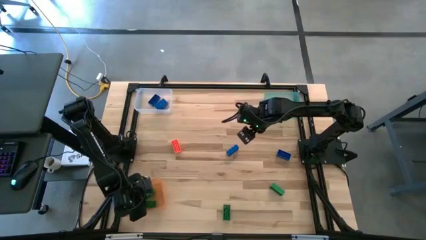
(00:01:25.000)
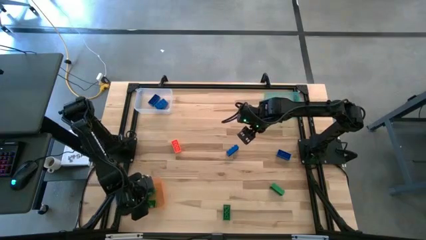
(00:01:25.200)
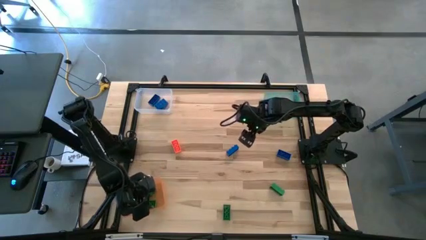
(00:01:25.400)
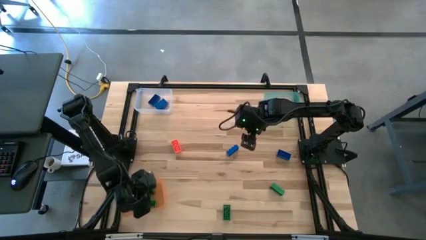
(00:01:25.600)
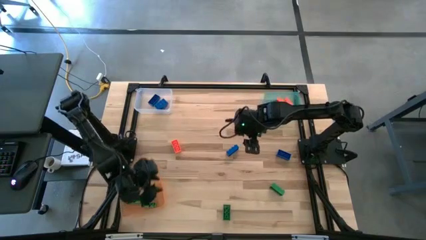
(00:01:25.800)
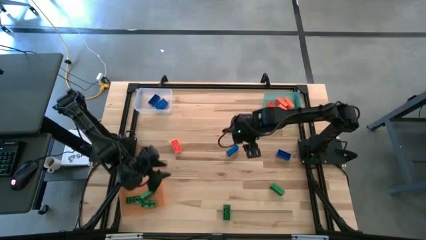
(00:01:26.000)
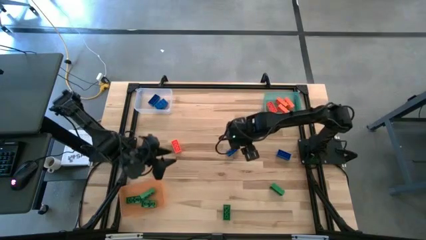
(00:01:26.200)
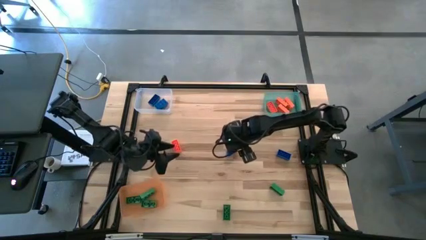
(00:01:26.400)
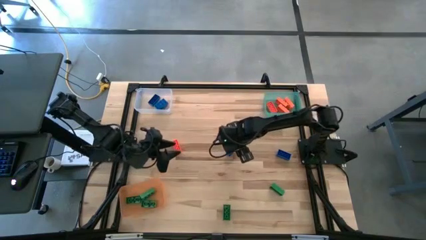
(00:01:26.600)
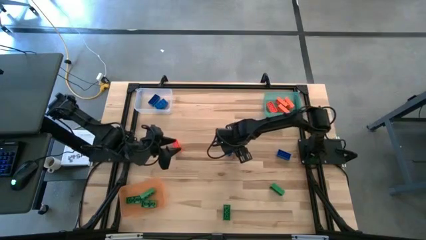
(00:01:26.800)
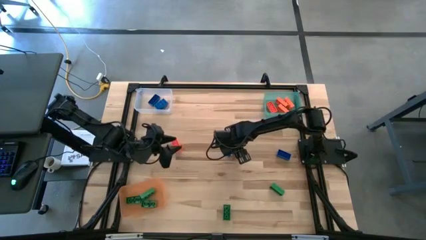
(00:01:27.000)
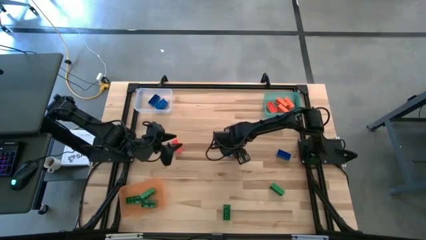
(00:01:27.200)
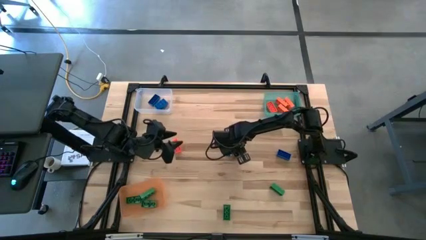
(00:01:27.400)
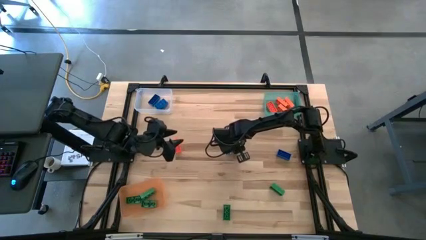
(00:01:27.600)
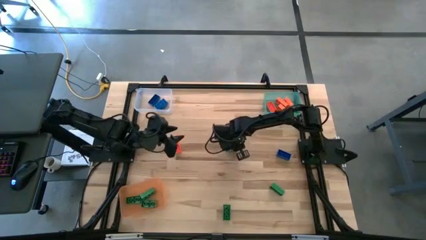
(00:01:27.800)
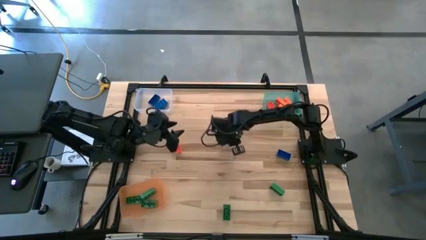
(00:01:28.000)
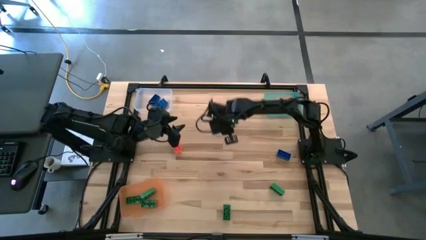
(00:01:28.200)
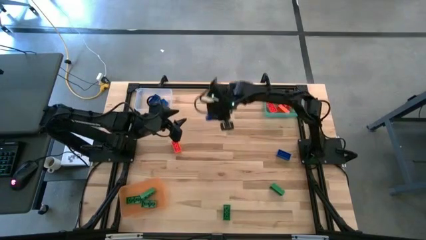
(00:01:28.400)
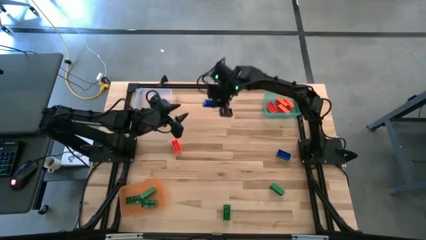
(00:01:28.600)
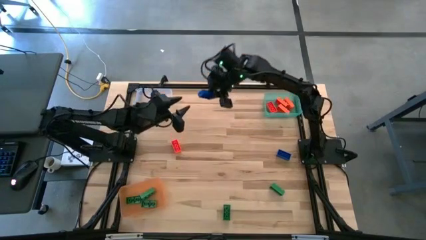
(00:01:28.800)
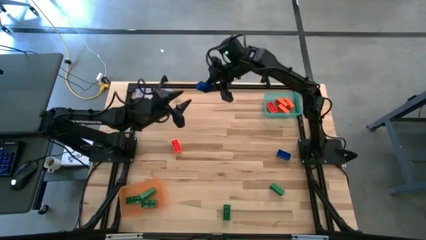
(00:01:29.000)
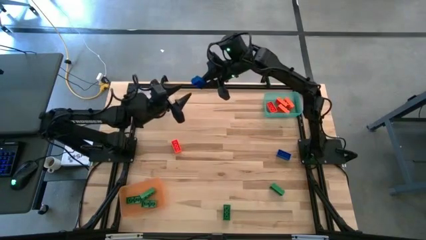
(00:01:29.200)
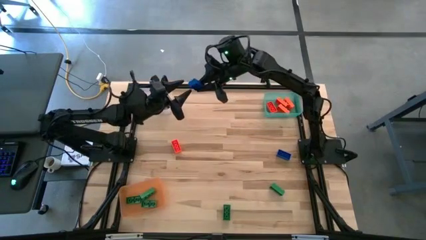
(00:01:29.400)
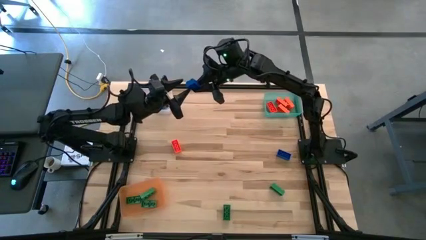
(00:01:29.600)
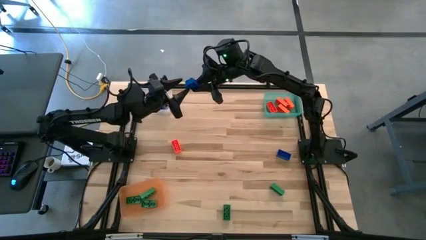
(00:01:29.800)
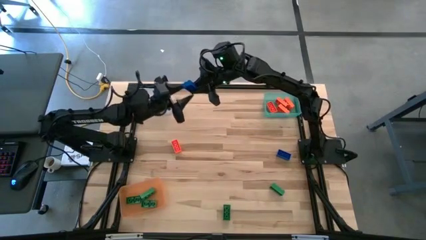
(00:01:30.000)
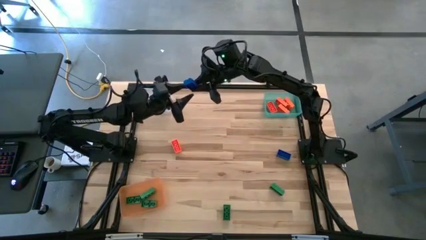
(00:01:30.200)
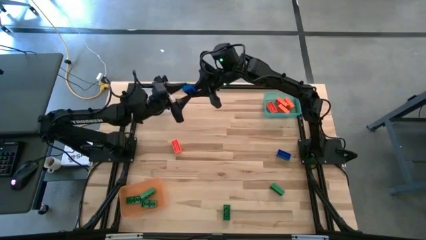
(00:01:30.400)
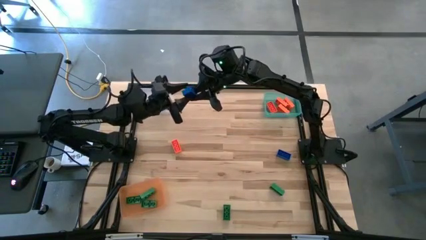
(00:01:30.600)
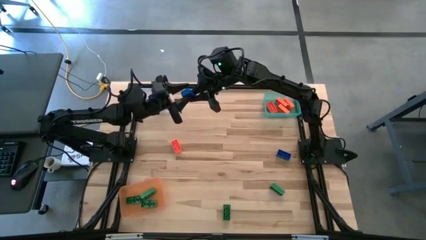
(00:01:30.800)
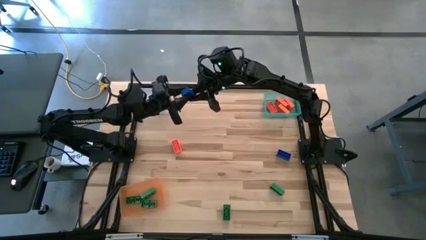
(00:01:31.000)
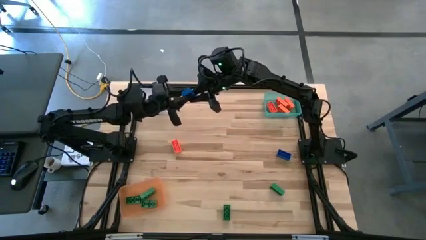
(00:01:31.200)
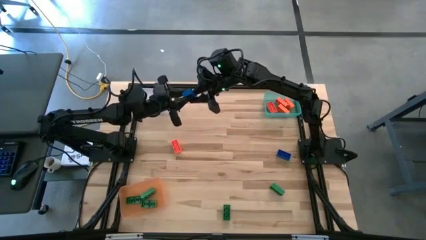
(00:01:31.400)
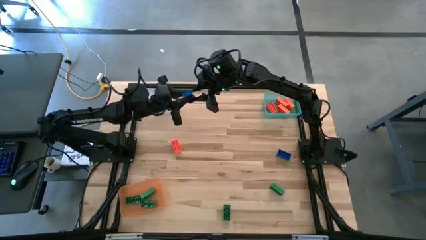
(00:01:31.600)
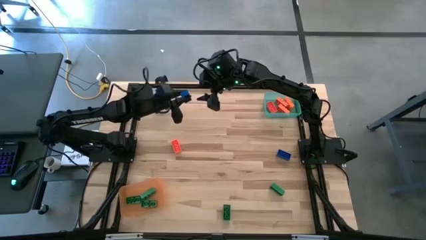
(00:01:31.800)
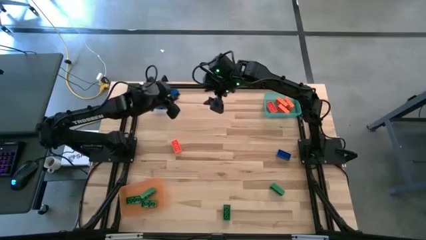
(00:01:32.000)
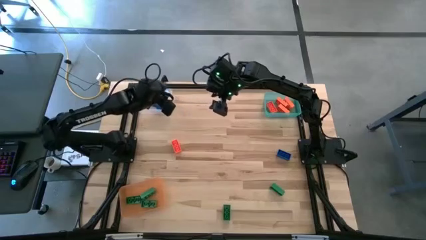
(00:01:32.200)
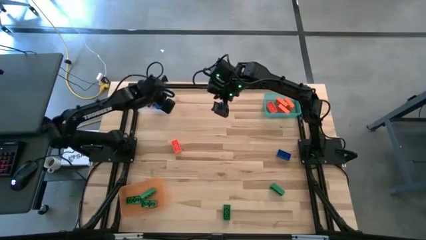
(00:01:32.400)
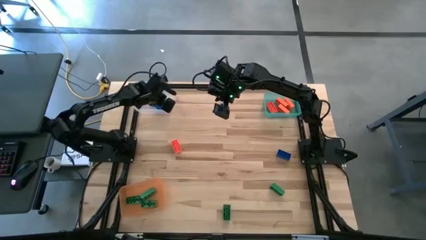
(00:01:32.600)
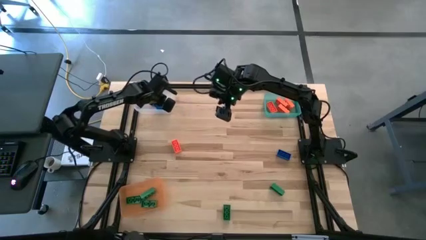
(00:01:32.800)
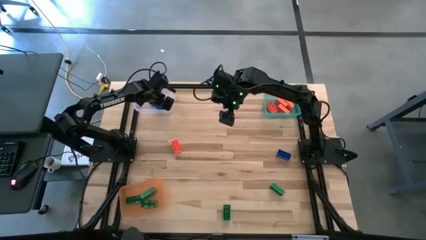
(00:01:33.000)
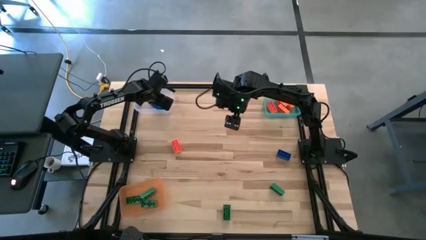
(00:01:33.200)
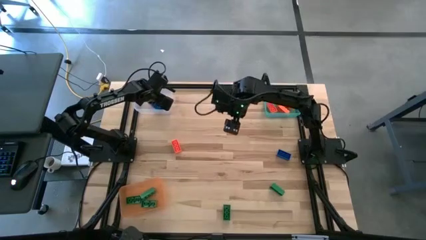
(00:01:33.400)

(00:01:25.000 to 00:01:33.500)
Task: Sort & place blocks by color
Put the left blue game piece into the transparent bin

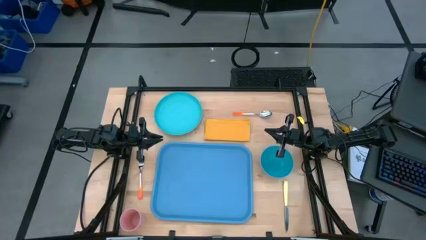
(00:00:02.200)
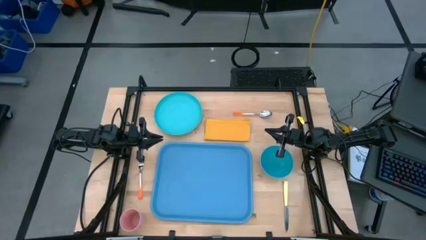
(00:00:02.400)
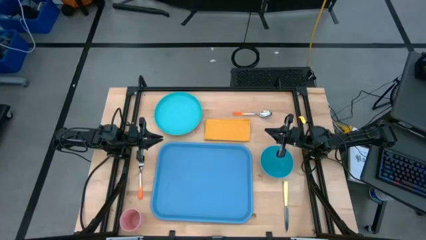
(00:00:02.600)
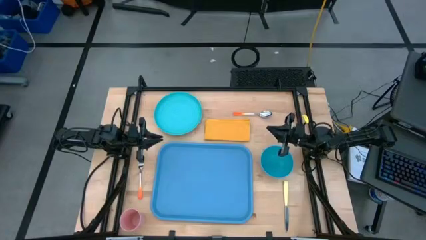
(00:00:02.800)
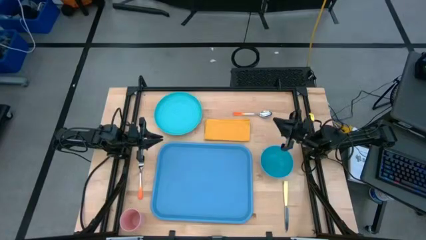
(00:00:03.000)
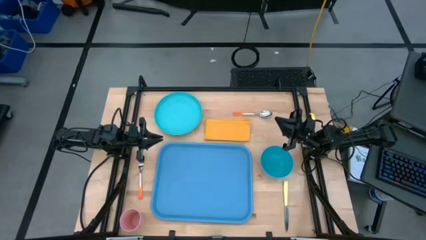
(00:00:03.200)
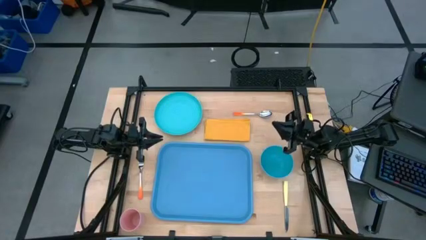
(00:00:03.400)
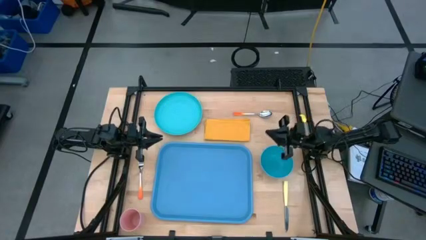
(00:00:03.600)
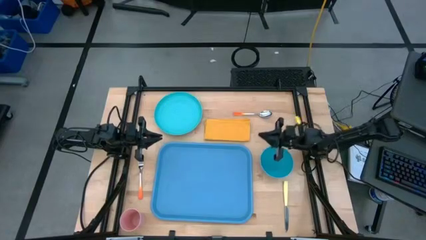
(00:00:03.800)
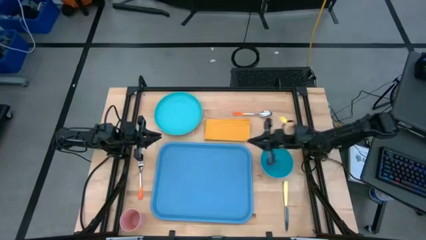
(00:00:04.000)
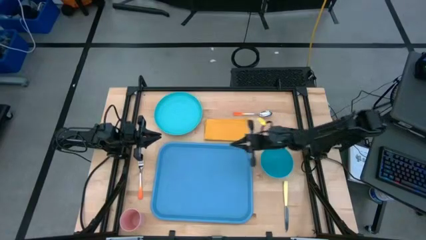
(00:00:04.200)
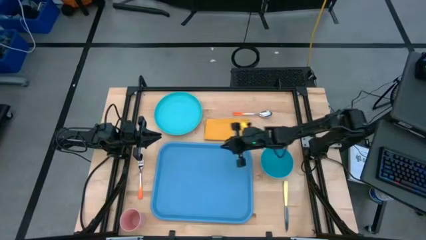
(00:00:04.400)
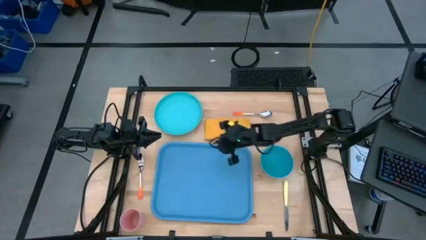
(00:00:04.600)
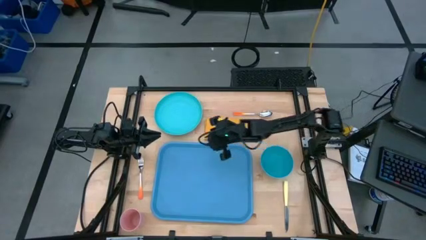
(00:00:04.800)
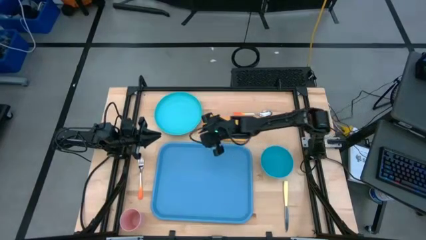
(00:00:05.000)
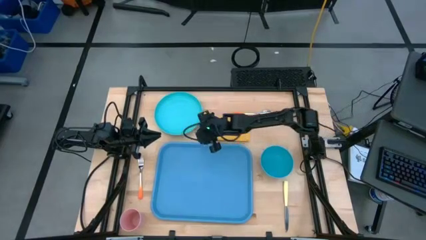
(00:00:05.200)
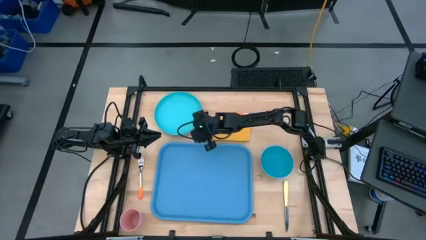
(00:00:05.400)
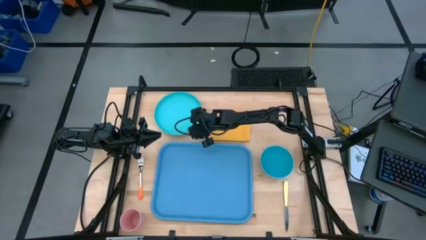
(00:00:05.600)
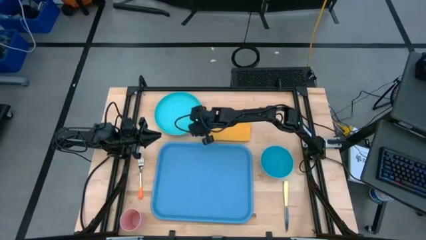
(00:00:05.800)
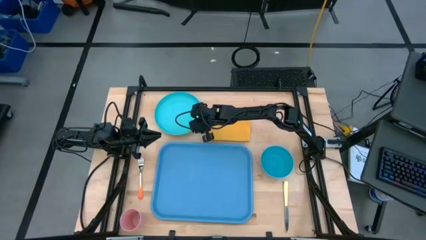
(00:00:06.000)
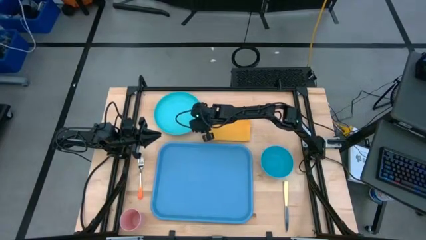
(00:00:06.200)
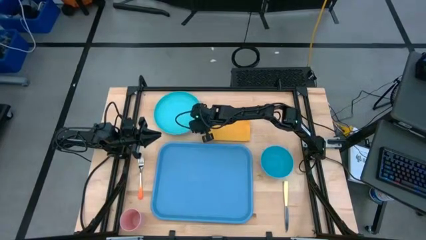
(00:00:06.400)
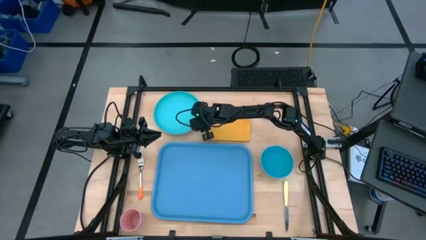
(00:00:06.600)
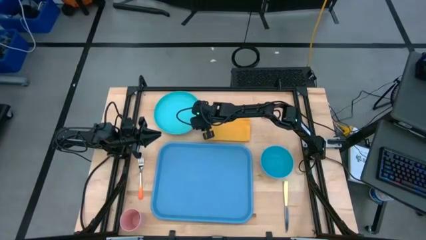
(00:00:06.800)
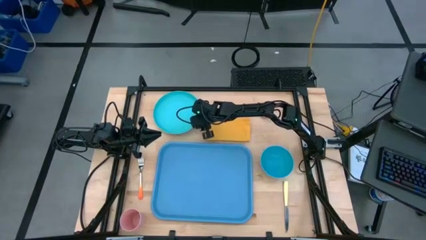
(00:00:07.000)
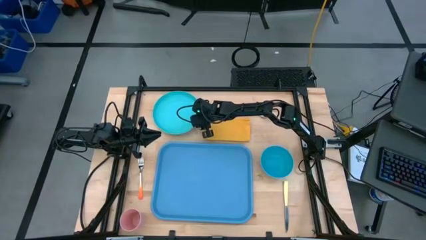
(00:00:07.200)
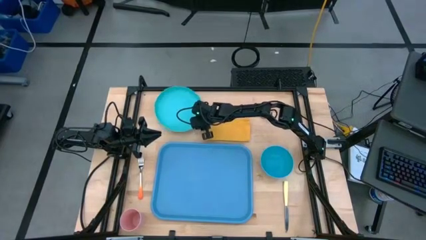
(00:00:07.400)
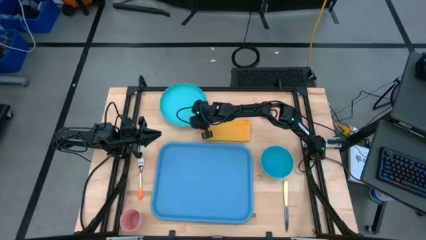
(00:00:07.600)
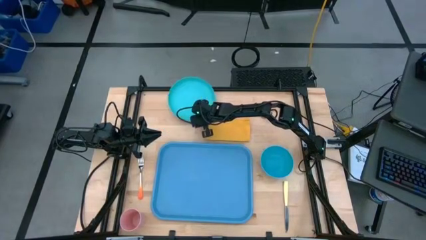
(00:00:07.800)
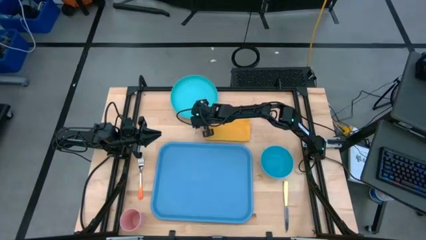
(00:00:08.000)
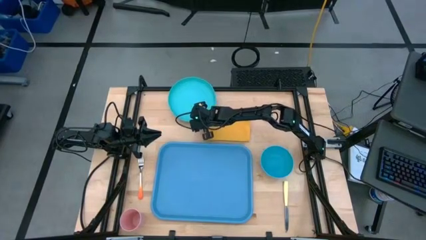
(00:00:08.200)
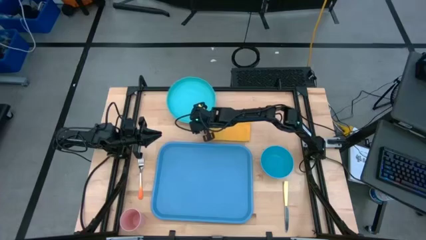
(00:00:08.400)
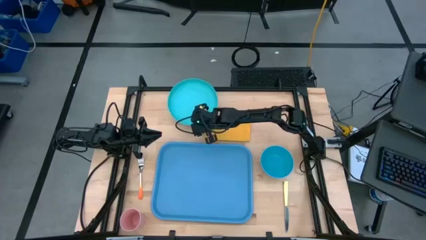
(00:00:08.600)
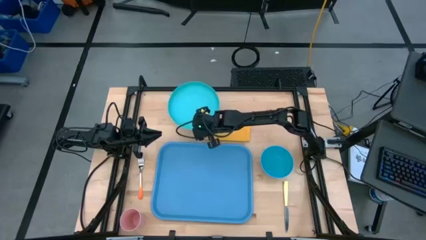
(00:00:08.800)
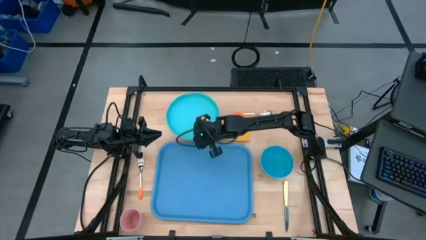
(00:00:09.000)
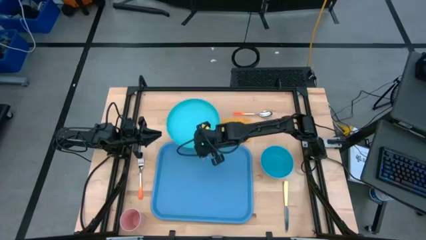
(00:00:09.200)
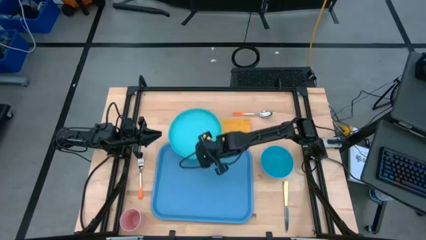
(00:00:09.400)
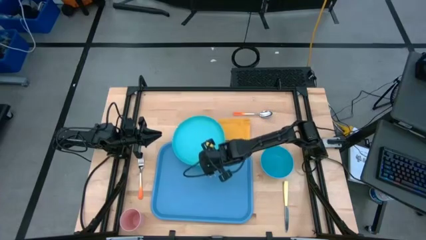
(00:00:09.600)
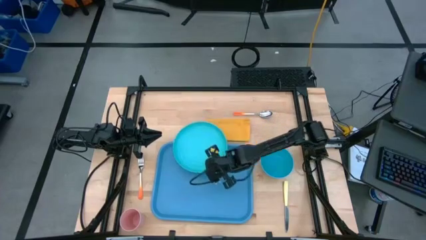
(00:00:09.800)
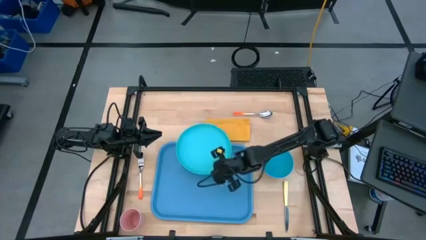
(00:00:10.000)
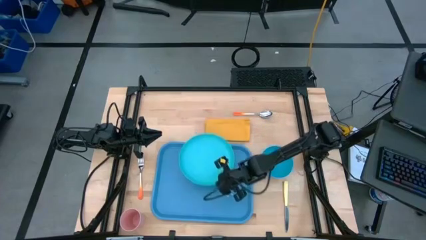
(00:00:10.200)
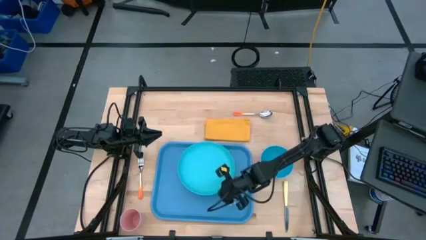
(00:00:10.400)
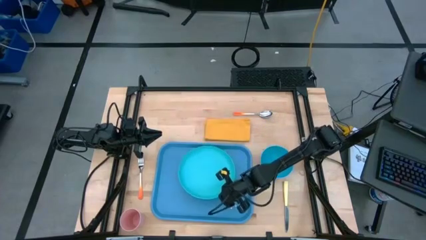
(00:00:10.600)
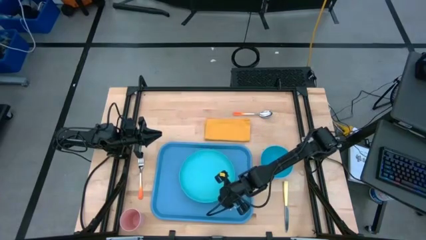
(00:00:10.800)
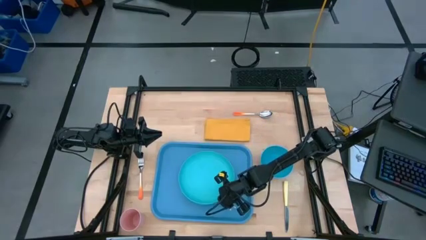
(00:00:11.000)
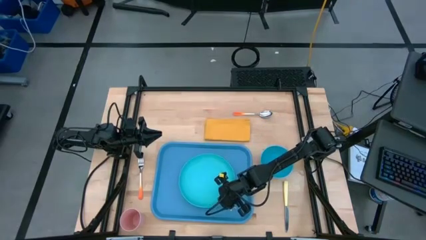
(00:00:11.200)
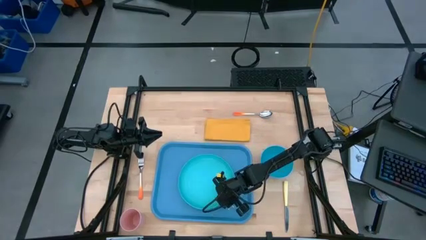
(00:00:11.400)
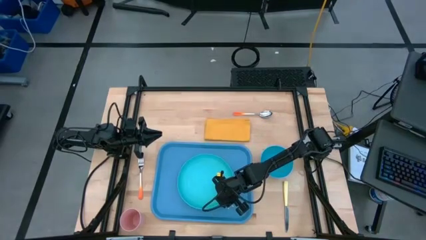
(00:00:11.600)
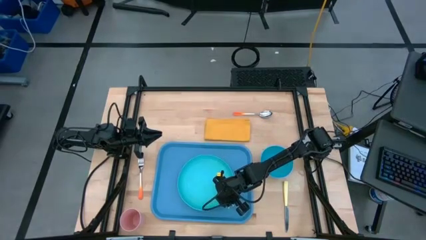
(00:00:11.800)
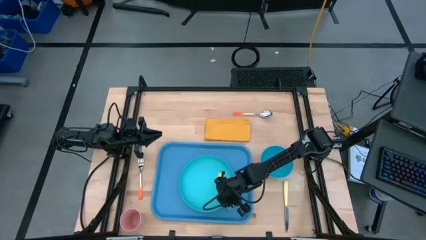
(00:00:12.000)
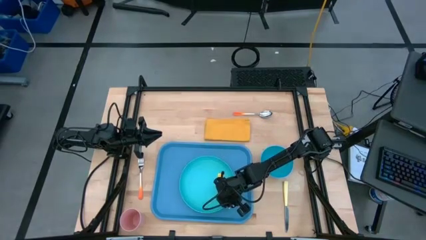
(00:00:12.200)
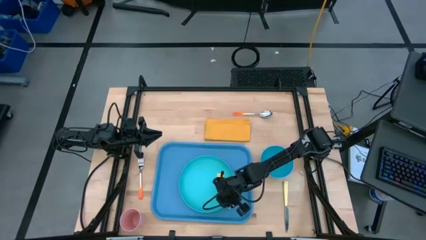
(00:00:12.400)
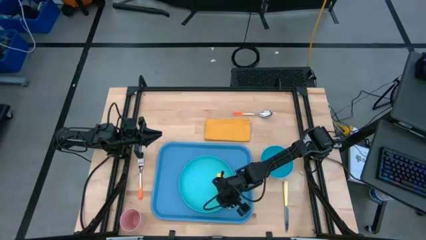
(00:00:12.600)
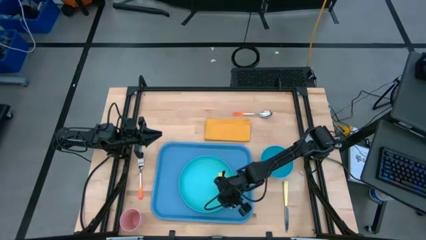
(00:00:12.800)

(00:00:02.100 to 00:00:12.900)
Task: Set up tray
Put the blue plate on the blue serving tray
